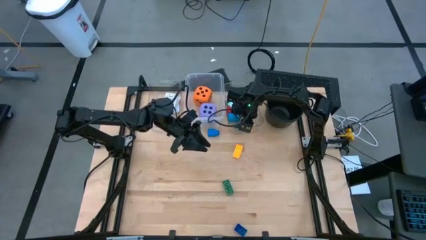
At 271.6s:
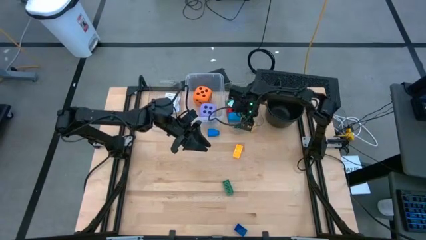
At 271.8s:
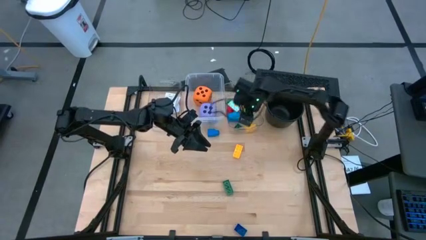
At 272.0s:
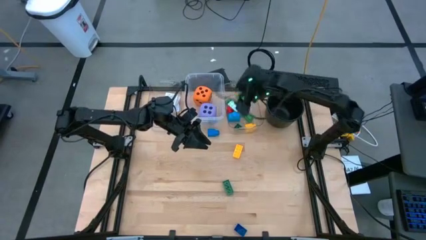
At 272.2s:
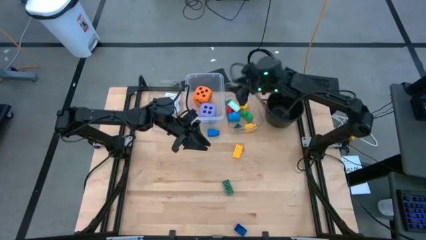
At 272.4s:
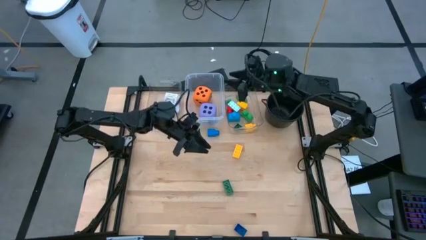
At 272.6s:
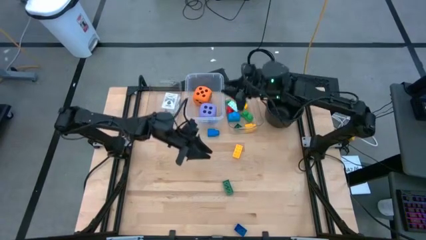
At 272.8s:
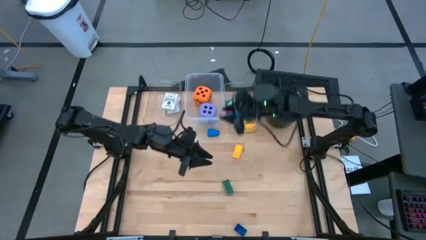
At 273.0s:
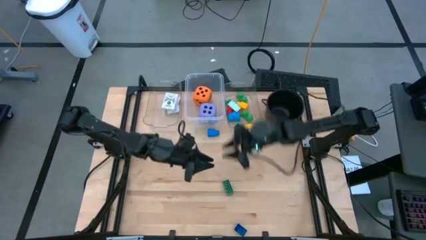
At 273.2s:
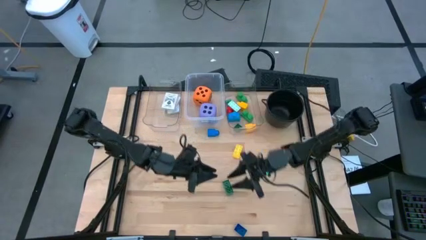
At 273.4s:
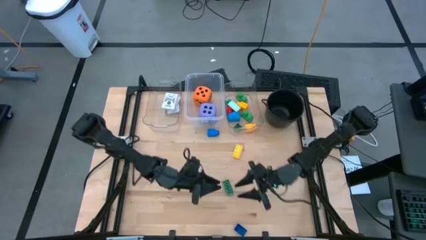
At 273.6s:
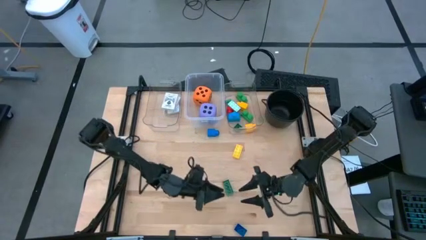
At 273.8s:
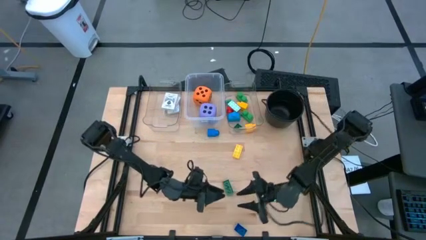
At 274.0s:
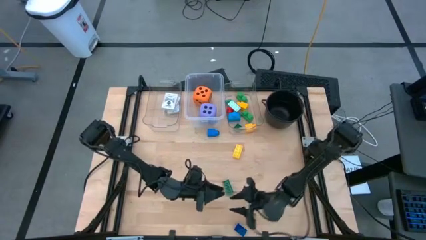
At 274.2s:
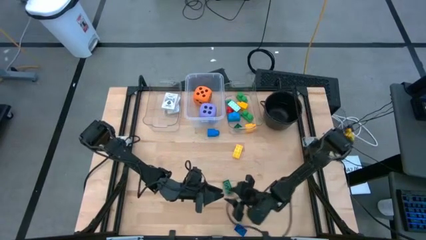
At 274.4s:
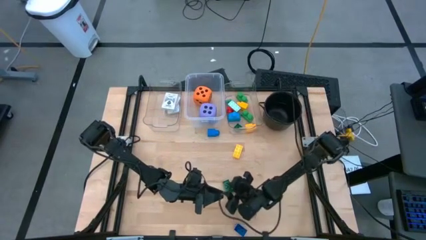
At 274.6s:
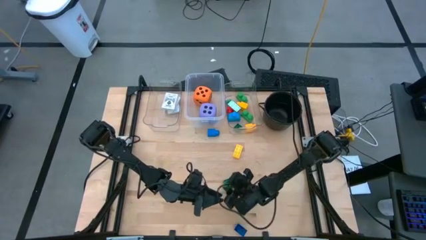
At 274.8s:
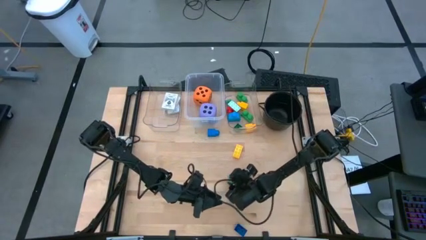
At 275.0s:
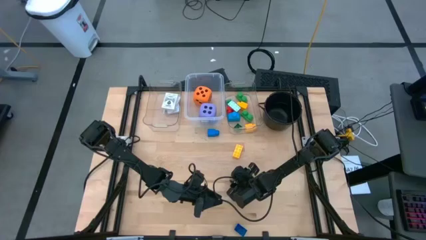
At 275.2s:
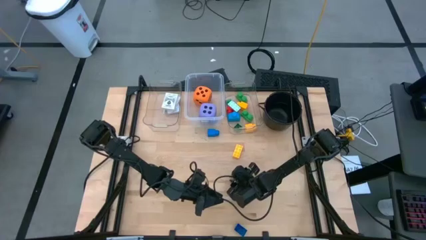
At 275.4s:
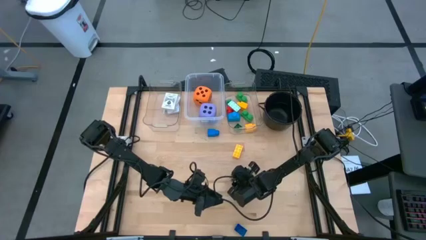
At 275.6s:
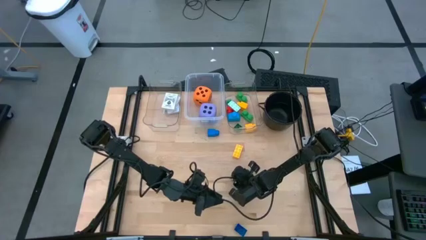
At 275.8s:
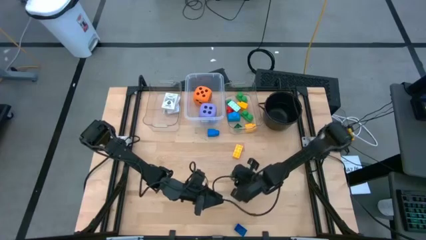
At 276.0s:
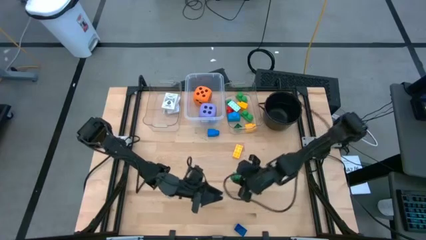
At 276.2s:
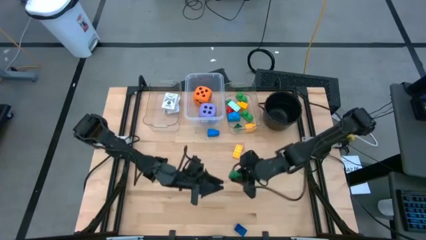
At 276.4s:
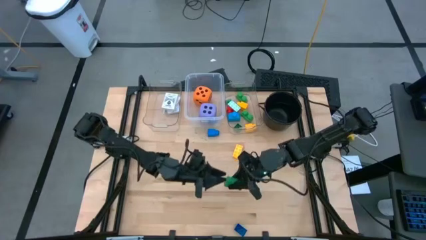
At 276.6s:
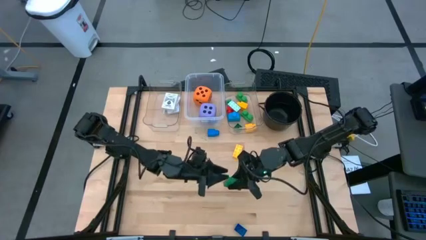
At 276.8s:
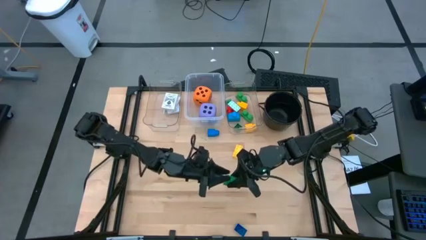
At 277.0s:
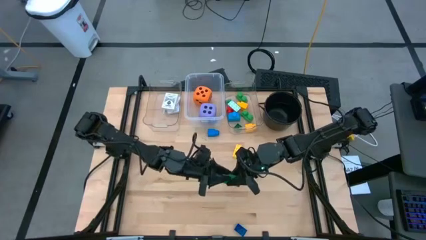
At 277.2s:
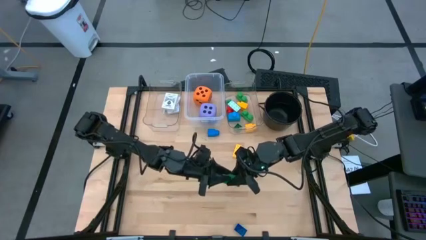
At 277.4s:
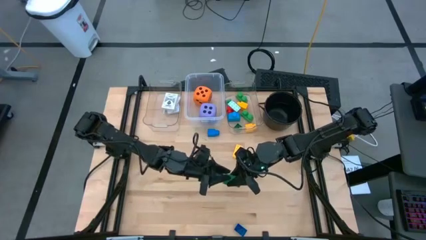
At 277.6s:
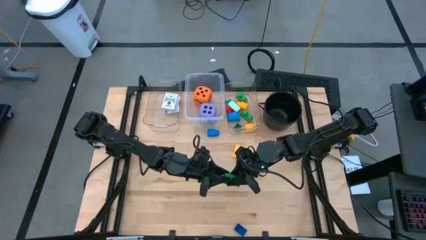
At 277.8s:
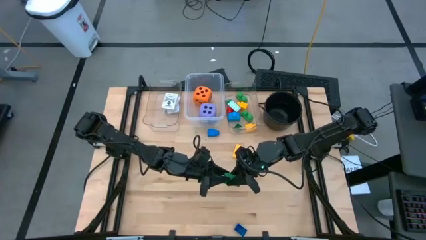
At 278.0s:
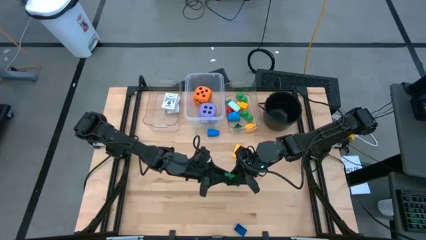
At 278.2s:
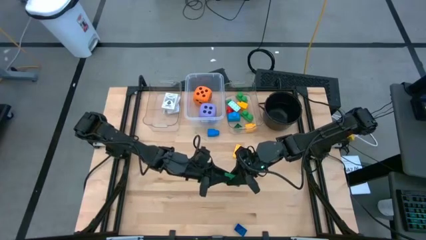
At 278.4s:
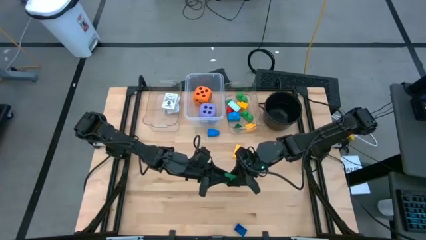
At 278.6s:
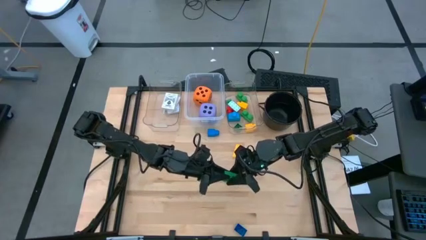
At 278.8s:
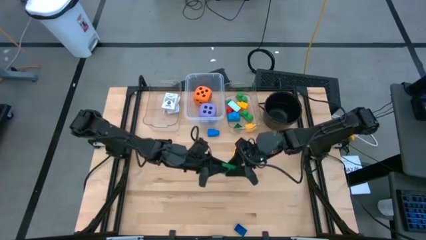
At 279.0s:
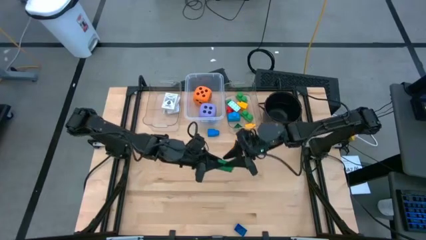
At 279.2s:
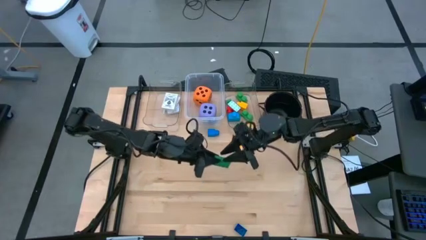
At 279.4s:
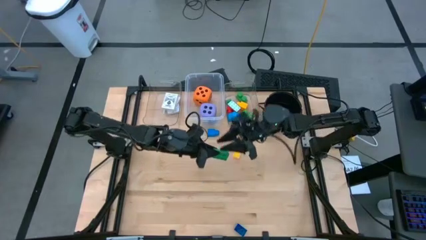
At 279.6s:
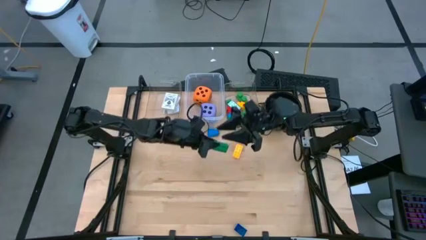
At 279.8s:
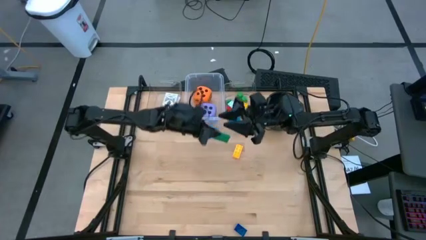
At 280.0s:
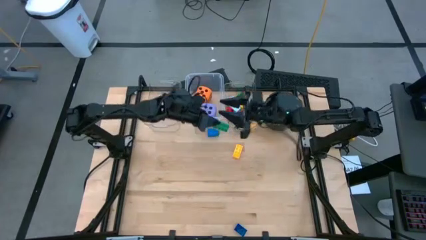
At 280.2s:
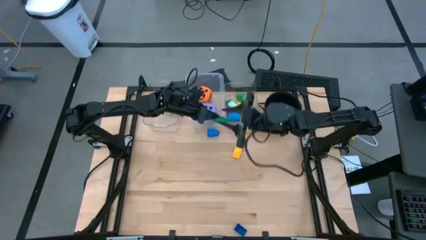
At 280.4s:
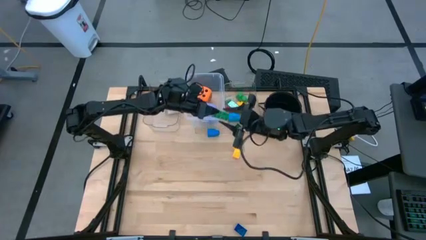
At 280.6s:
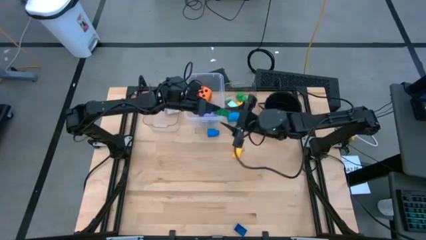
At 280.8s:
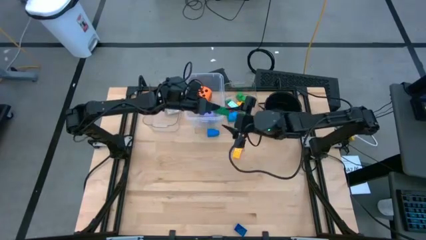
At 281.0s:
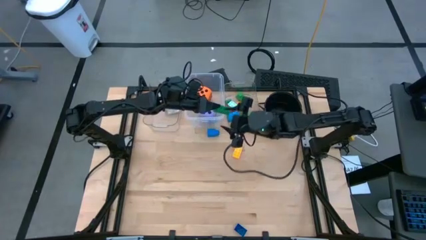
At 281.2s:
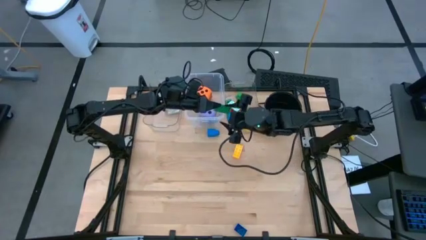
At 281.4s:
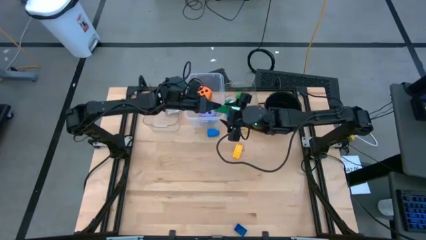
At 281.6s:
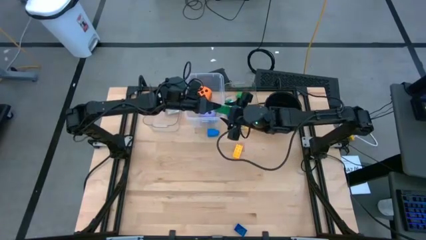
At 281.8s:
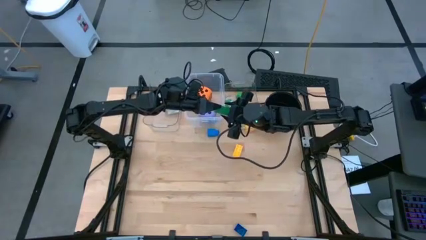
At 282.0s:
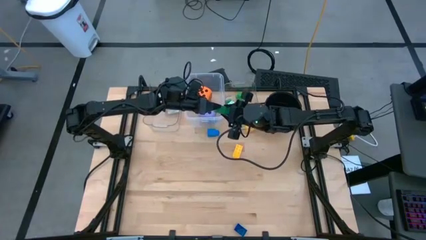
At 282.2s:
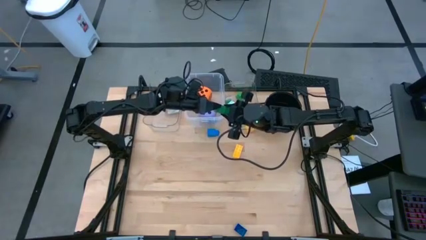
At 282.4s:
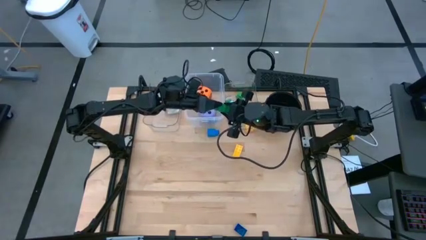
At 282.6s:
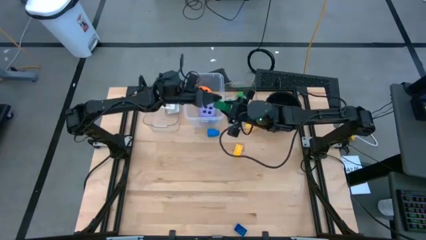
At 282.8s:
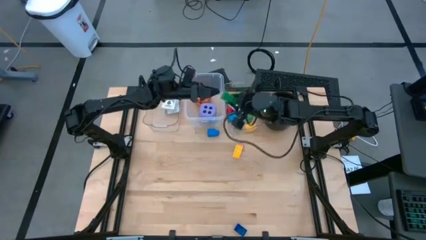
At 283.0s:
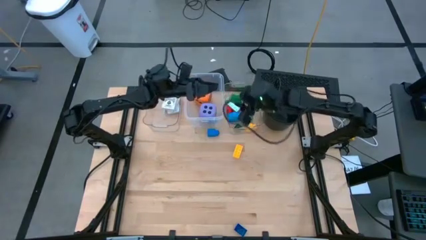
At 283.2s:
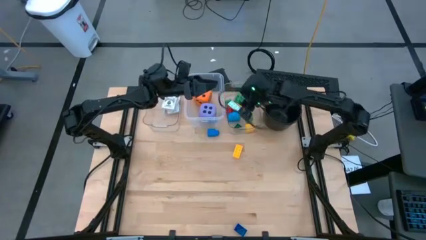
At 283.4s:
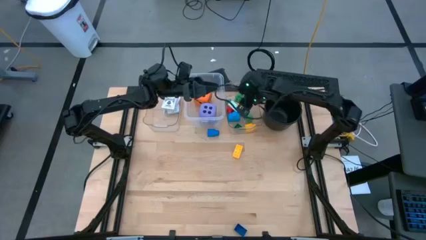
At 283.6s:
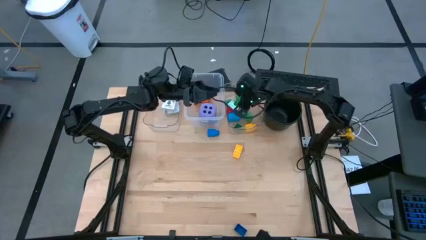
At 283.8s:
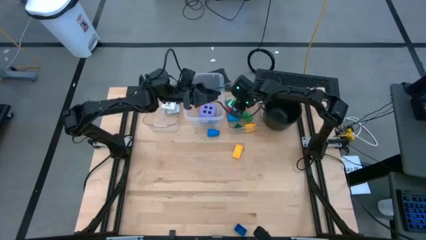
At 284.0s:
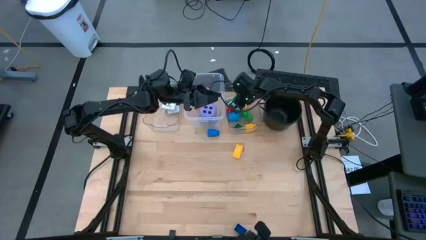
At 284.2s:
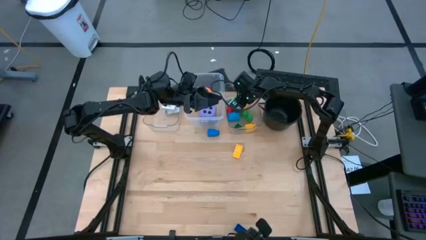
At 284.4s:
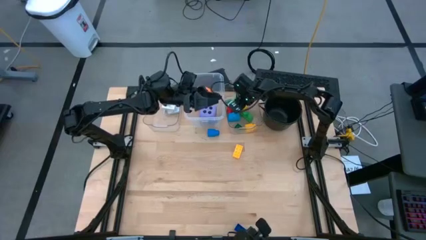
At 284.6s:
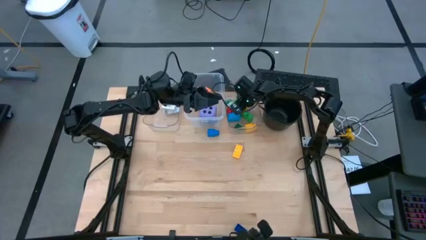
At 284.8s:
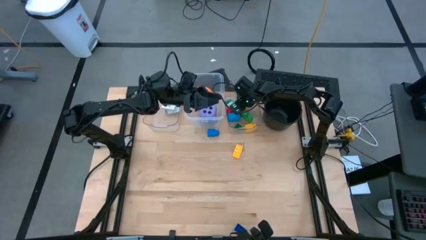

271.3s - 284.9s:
Task: Pick & Place Toys
Put the dark green game piece into the right transparent bin
